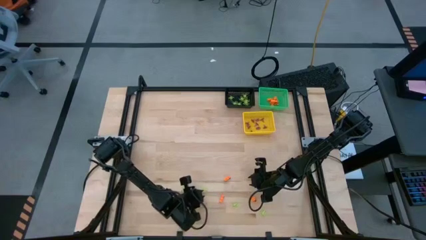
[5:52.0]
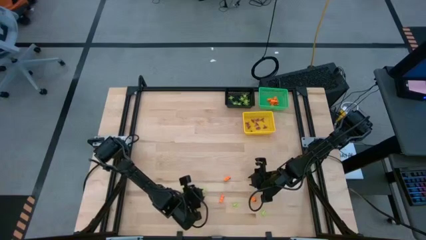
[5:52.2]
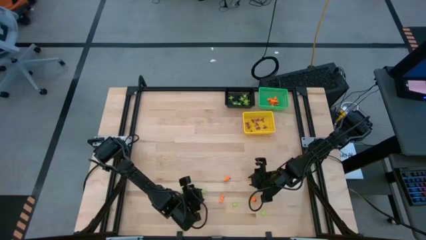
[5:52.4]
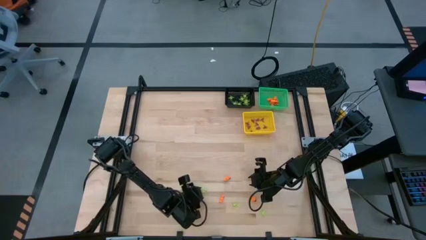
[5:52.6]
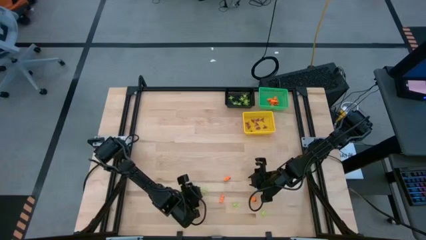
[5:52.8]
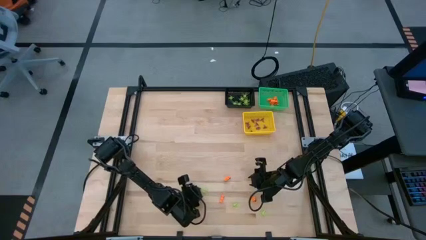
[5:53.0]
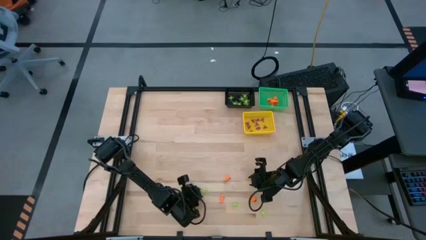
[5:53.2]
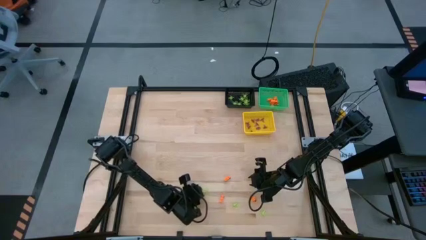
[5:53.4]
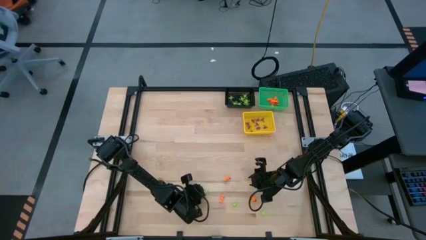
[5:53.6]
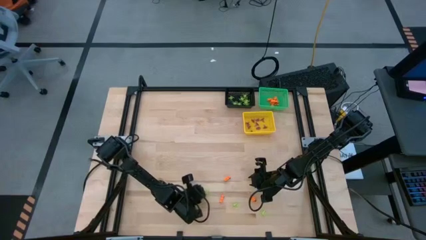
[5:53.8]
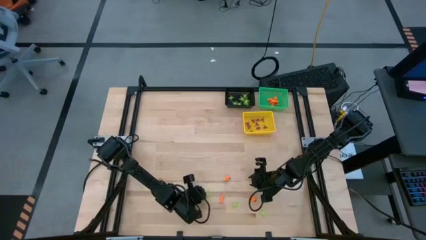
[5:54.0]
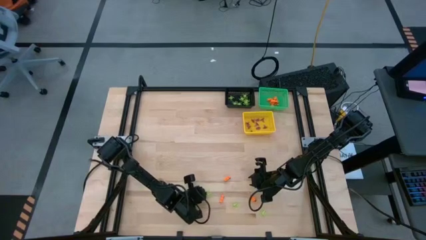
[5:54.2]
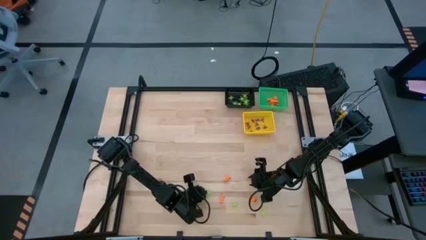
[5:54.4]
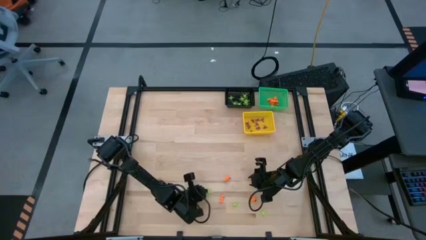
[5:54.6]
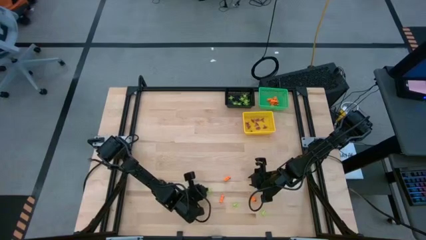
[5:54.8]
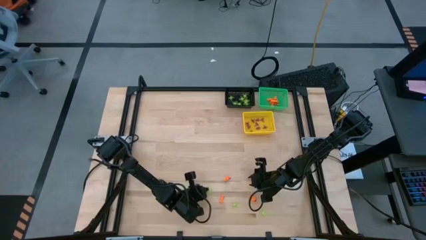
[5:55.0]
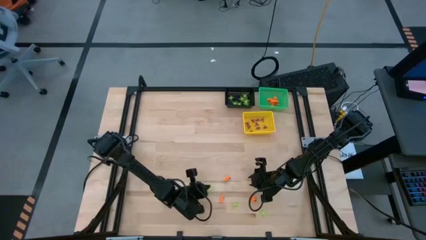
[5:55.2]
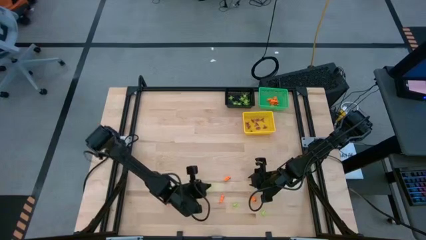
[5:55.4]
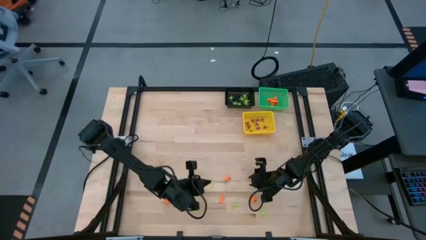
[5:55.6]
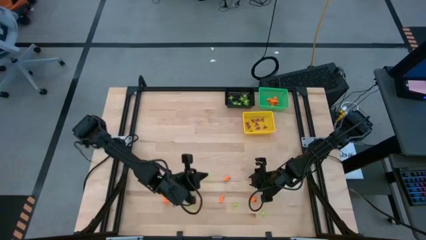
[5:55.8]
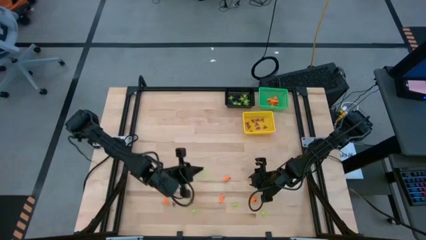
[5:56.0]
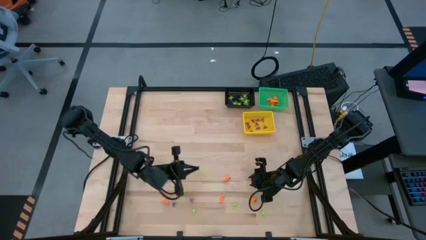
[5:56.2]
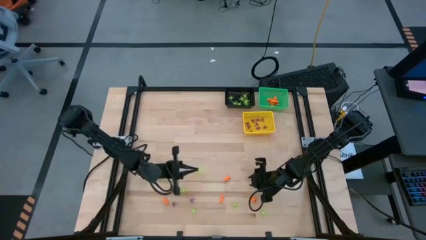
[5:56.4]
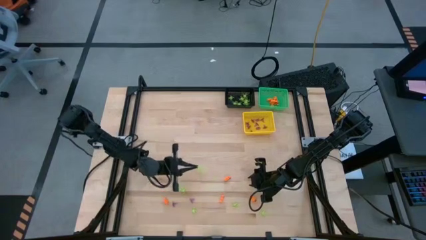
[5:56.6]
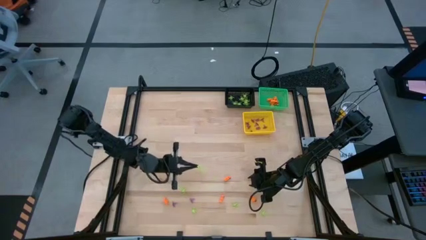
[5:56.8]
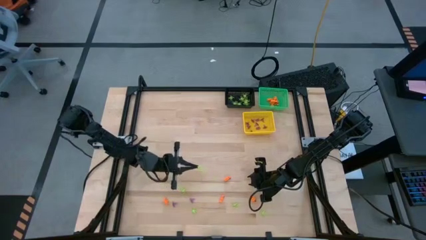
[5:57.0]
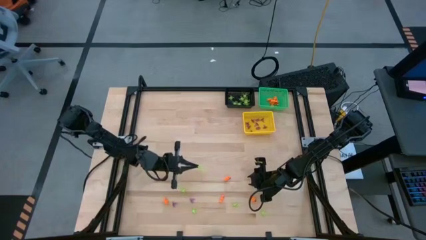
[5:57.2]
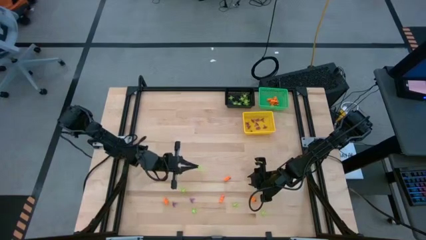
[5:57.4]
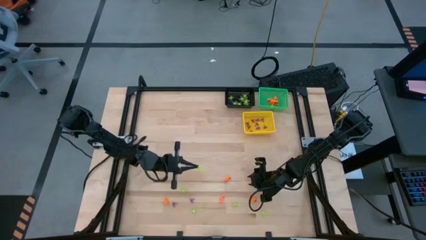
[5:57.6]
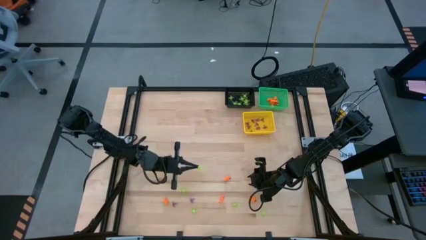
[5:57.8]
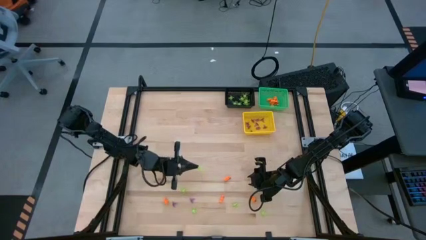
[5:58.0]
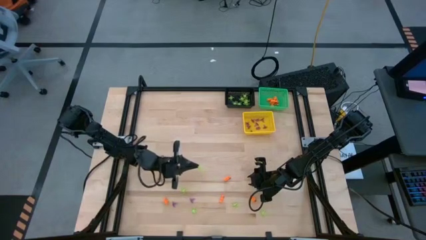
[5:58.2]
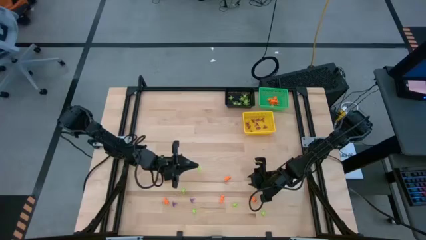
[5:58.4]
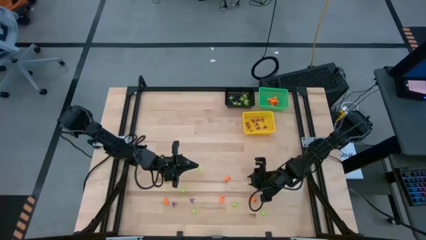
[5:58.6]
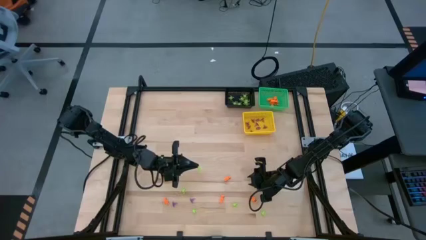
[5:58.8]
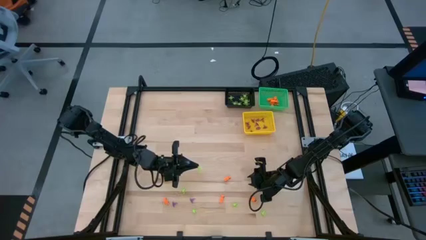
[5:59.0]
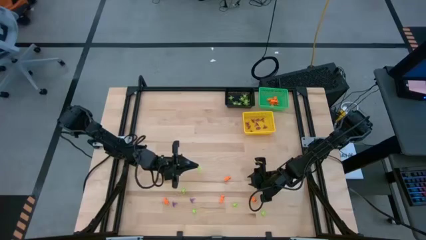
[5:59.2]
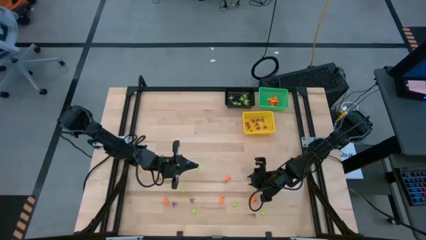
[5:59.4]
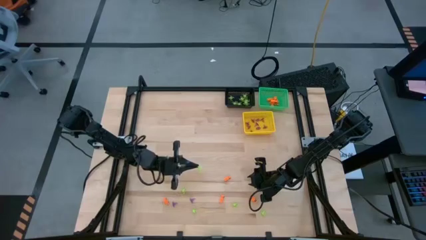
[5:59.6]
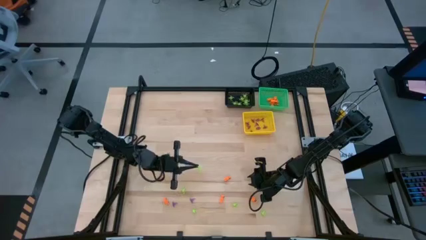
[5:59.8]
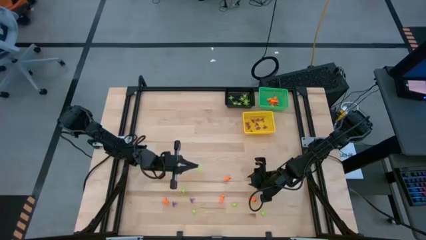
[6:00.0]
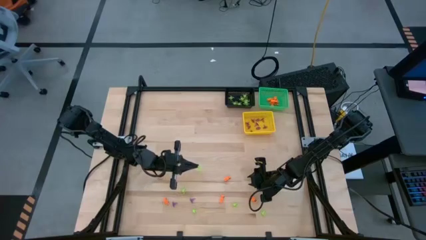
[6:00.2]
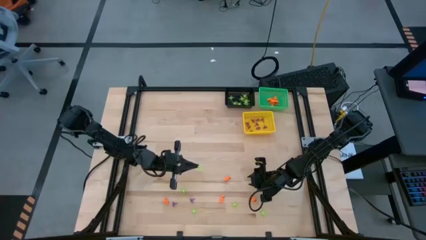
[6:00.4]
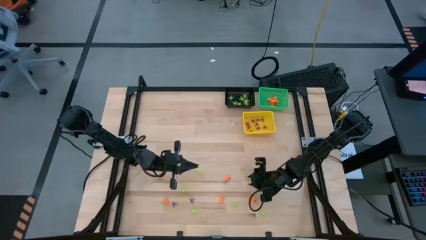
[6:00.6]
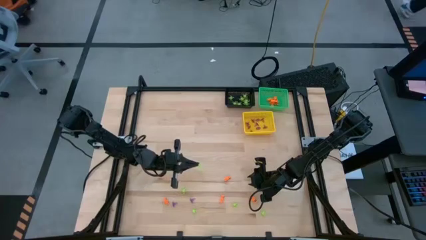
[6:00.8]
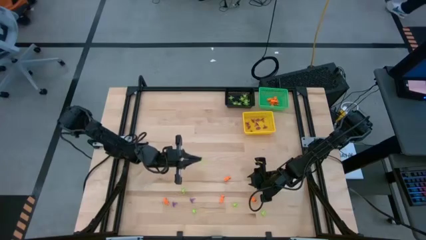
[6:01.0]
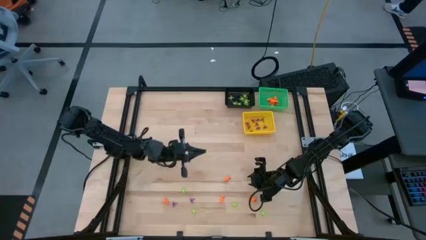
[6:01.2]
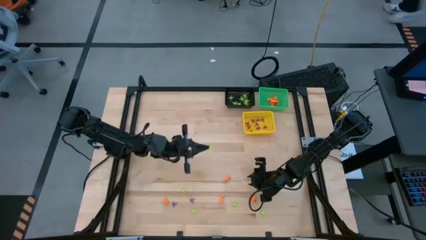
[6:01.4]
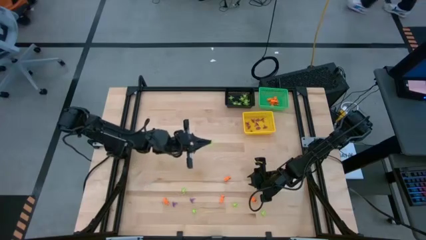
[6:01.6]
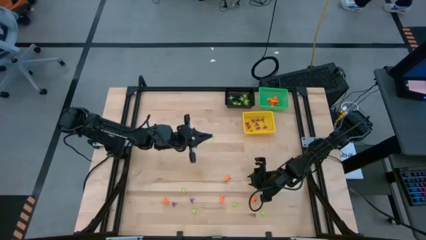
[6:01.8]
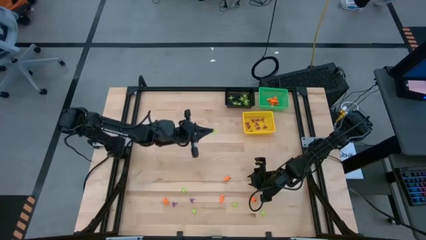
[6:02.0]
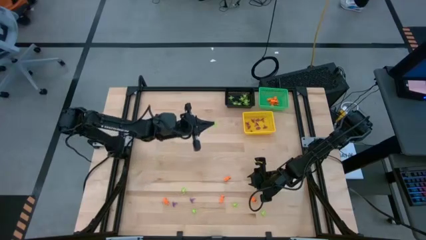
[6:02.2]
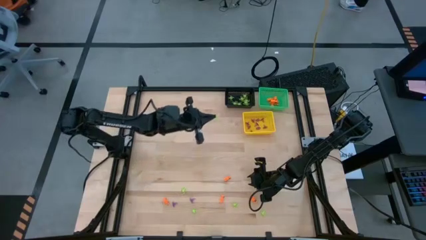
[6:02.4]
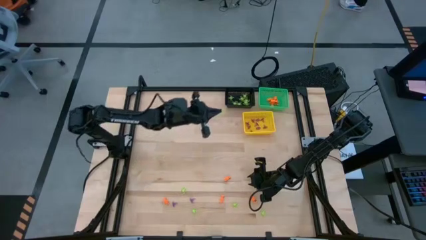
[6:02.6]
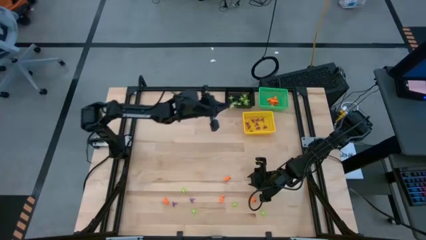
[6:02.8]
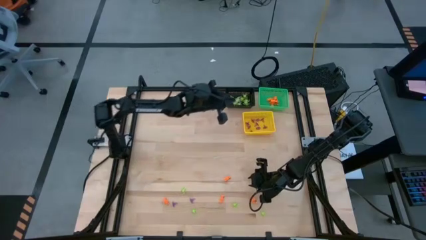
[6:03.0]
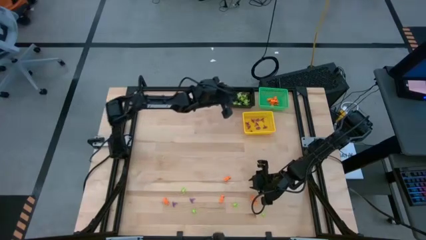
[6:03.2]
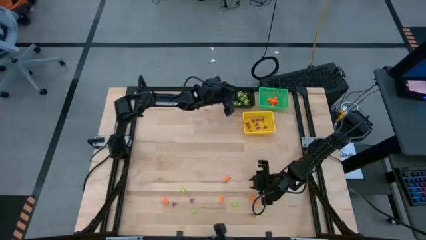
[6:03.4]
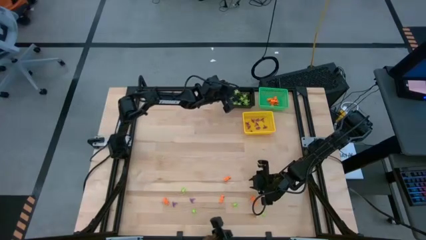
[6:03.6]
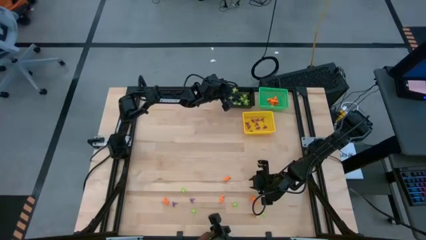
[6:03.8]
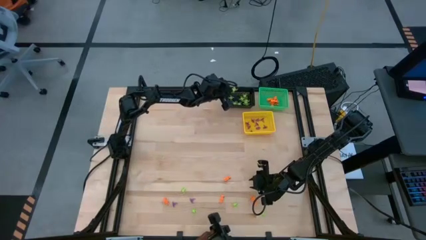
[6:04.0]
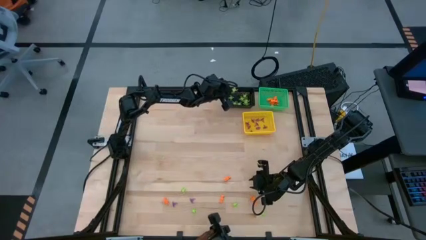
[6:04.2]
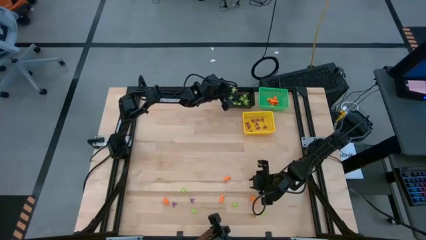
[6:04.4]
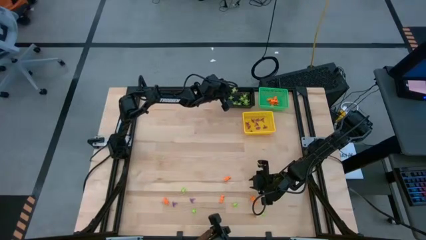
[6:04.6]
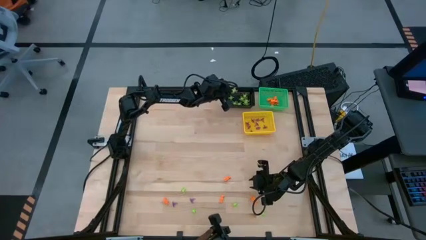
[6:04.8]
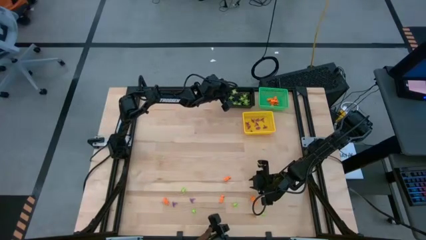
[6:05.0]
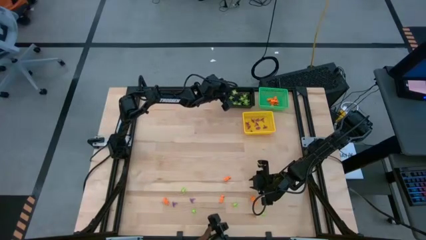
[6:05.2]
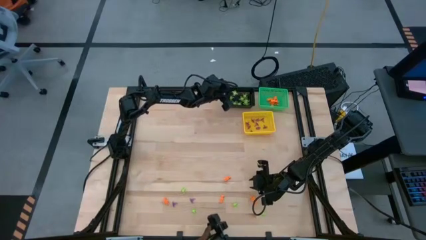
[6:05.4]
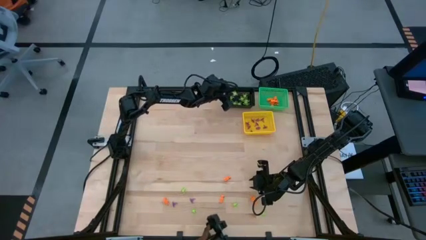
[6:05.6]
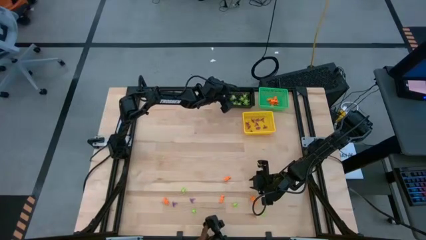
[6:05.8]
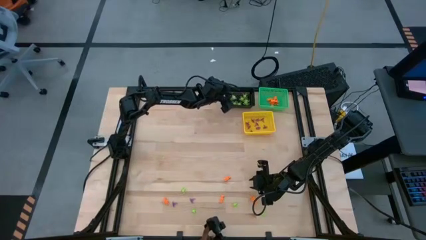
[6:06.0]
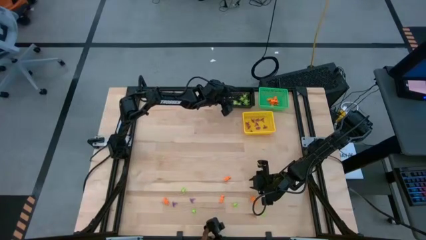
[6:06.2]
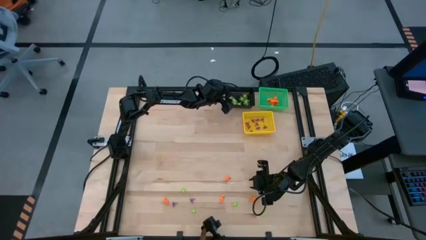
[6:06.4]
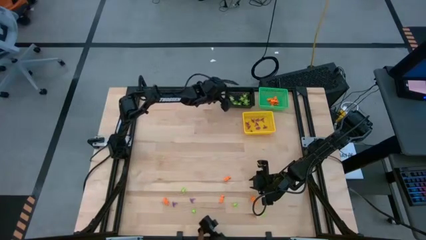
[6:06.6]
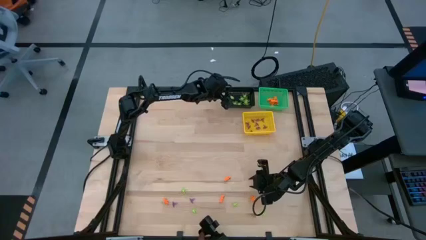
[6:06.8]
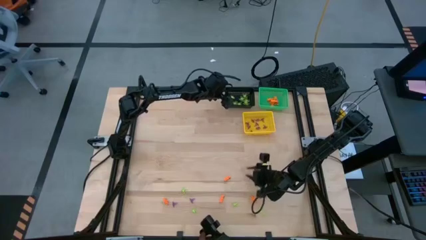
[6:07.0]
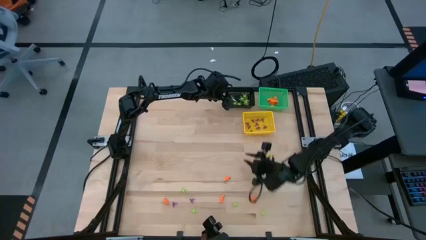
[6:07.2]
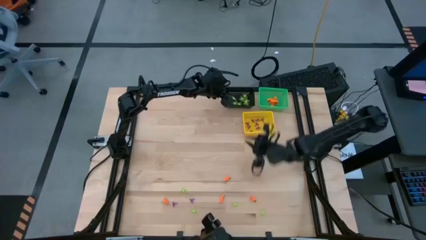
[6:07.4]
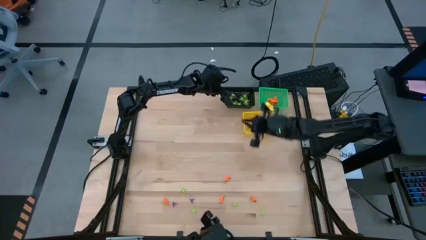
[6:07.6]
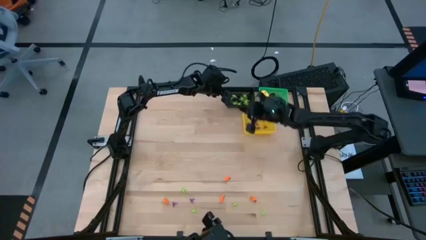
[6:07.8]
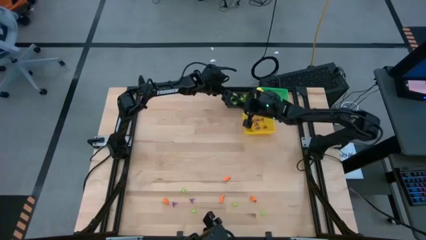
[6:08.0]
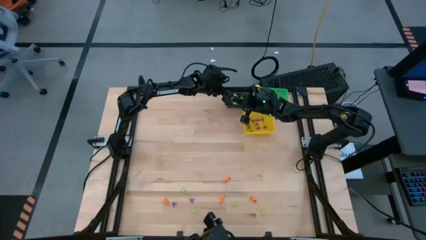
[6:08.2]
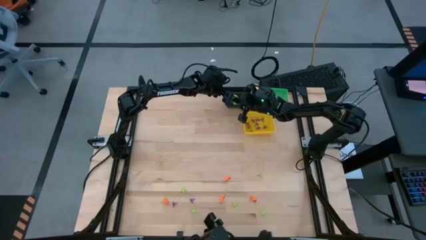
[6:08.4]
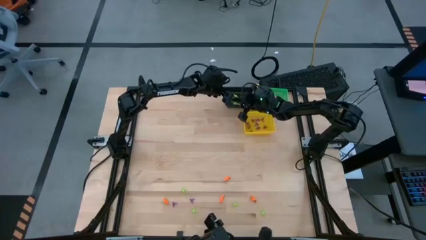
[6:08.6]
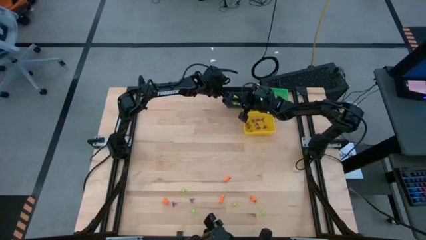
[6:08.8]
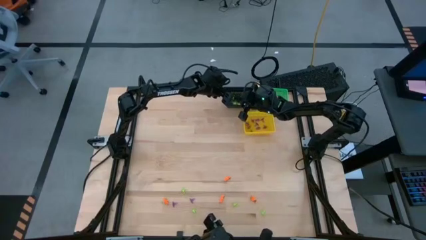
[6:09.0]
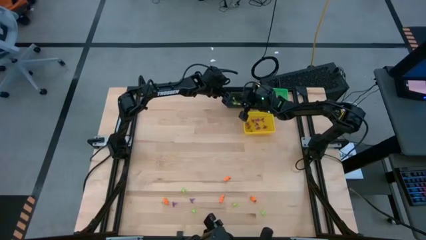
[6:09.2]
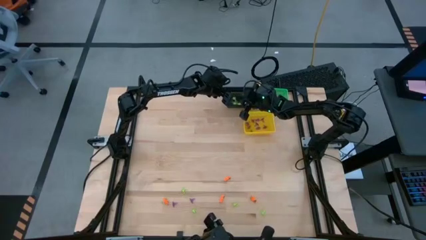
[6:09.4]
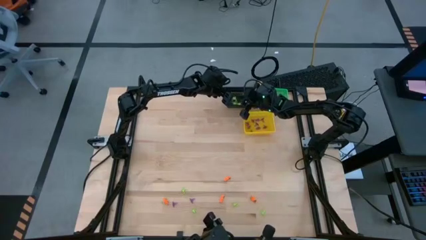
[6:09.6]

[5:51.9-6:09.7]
Task: Sort Halloween decoration
Put the green spider toy into the black basket
